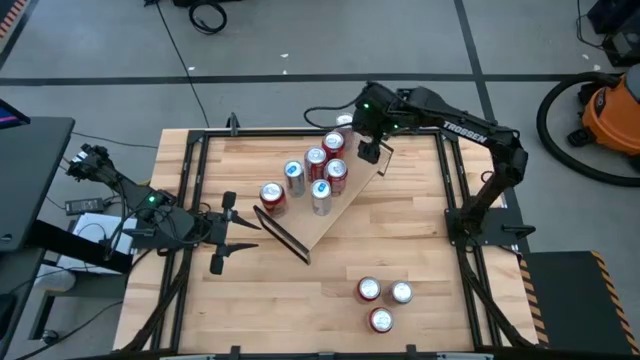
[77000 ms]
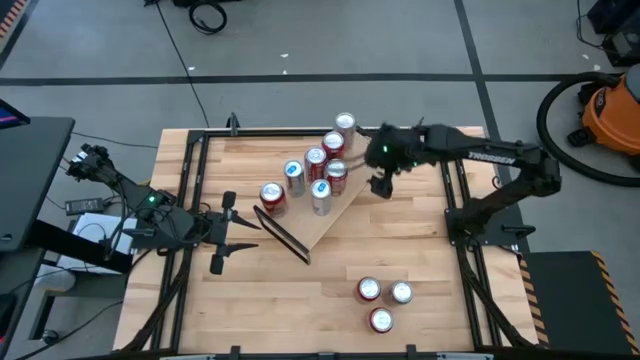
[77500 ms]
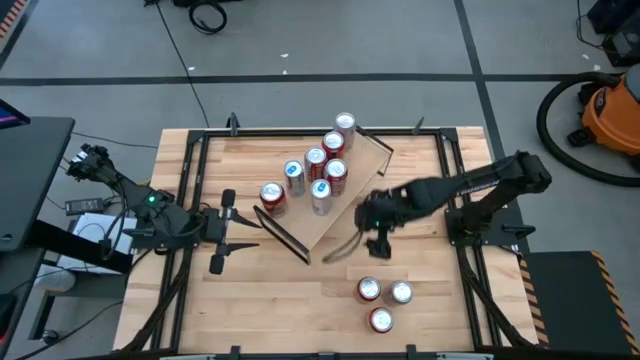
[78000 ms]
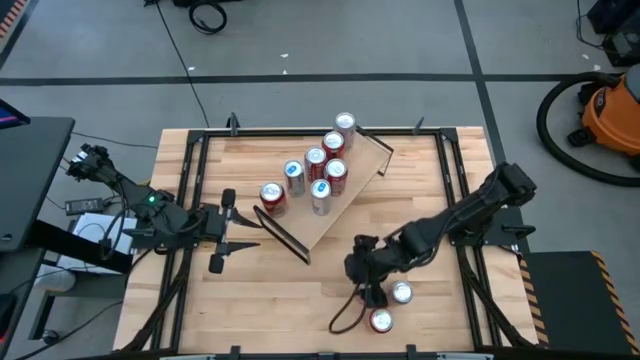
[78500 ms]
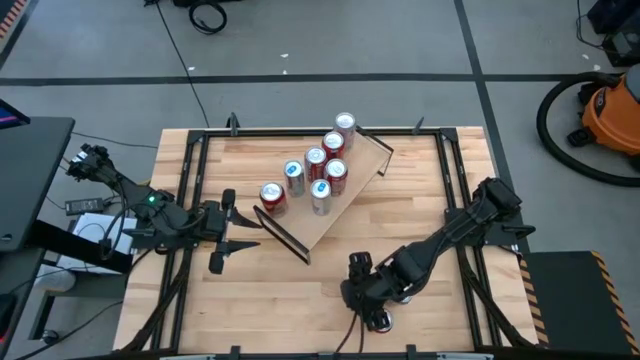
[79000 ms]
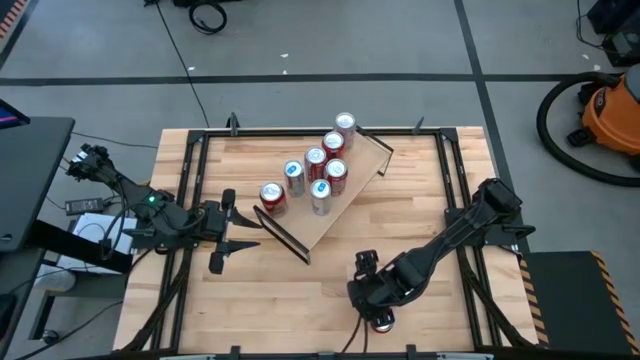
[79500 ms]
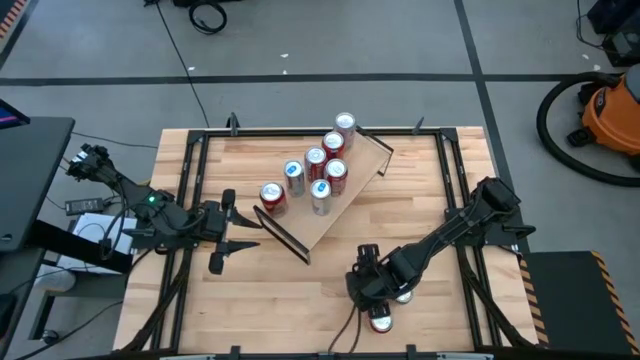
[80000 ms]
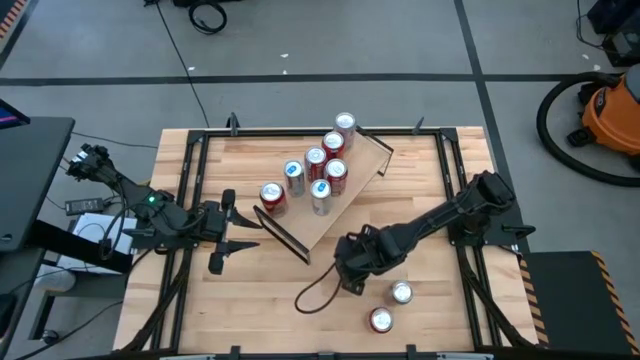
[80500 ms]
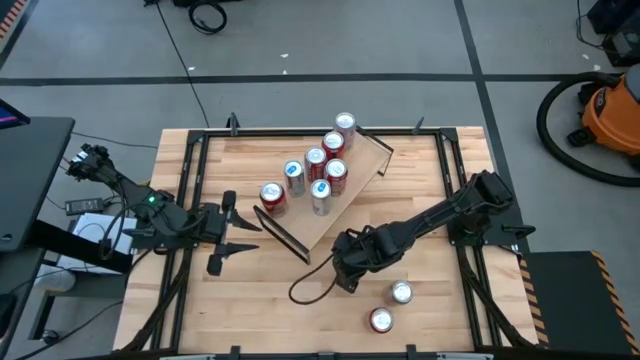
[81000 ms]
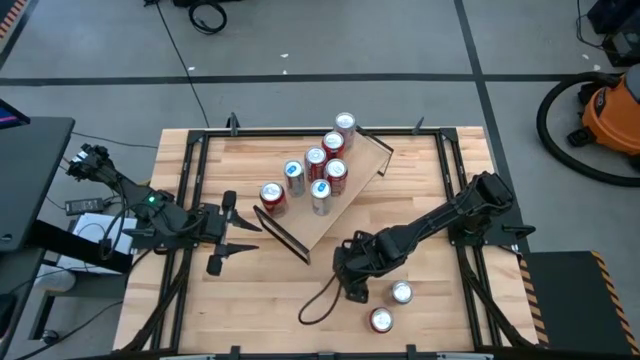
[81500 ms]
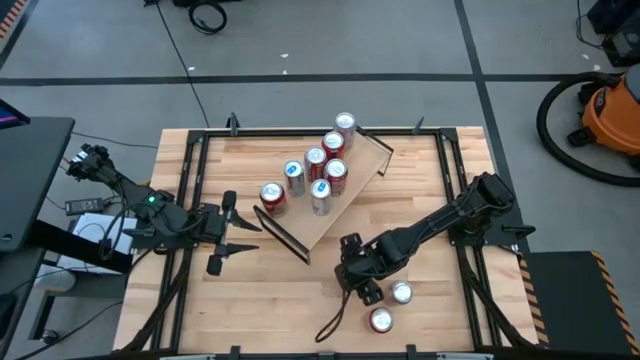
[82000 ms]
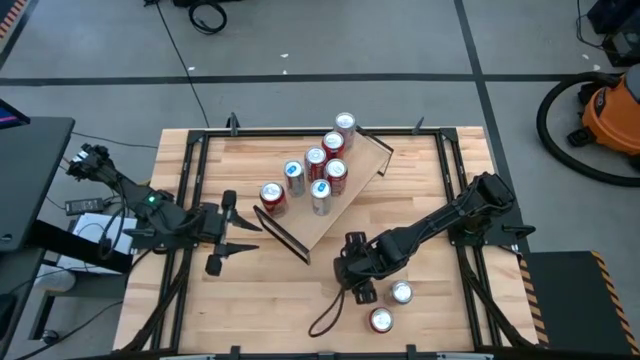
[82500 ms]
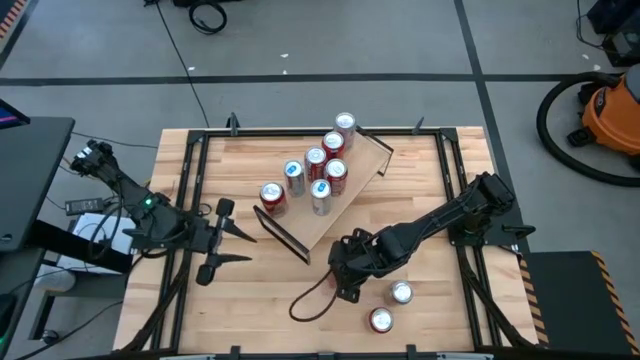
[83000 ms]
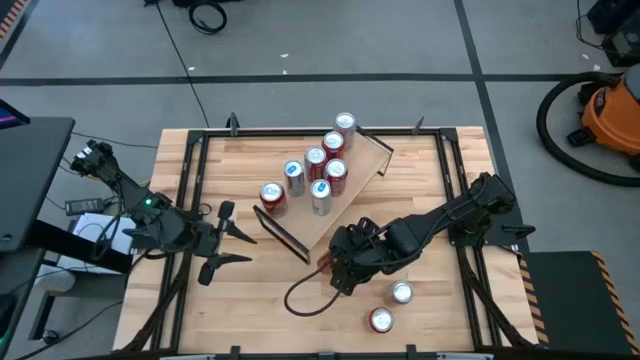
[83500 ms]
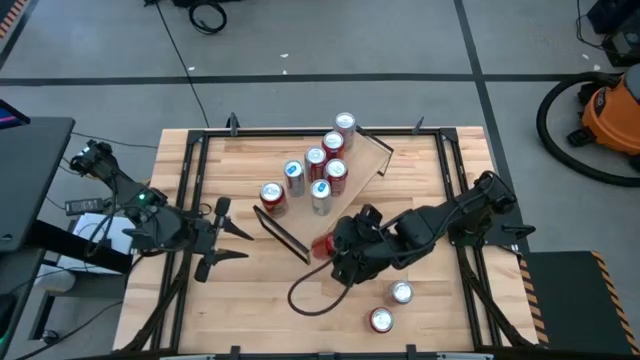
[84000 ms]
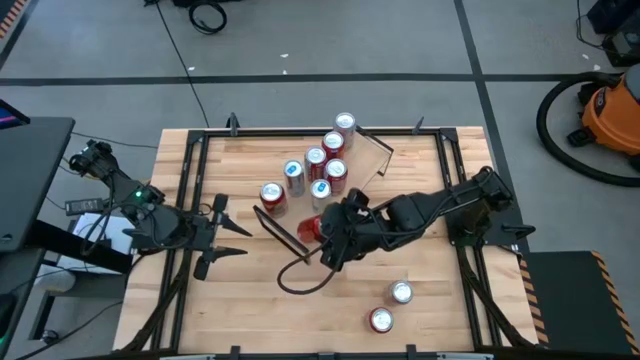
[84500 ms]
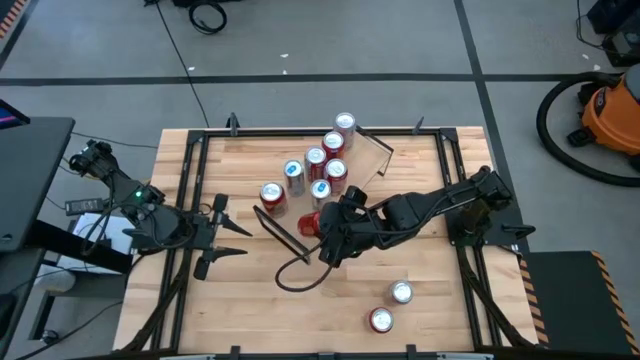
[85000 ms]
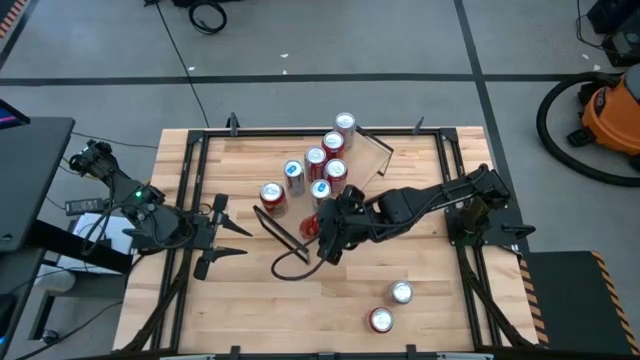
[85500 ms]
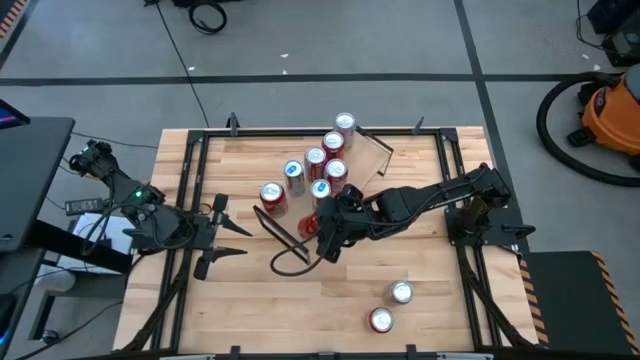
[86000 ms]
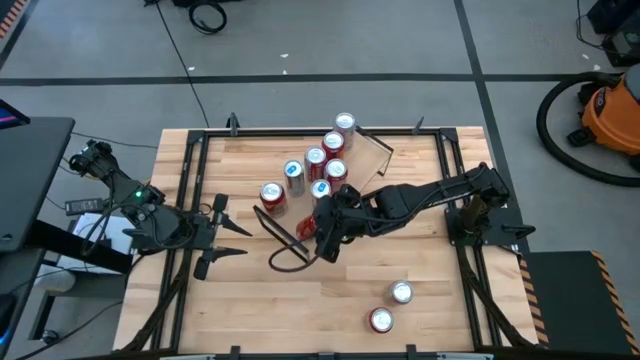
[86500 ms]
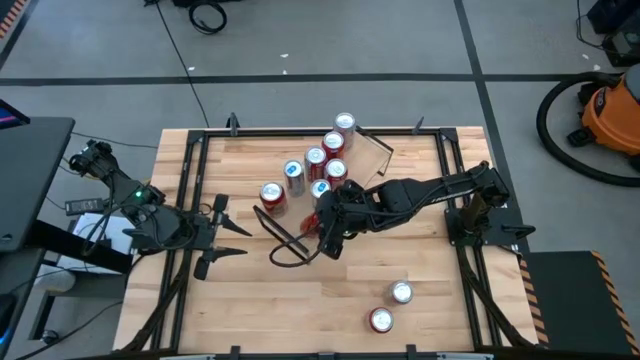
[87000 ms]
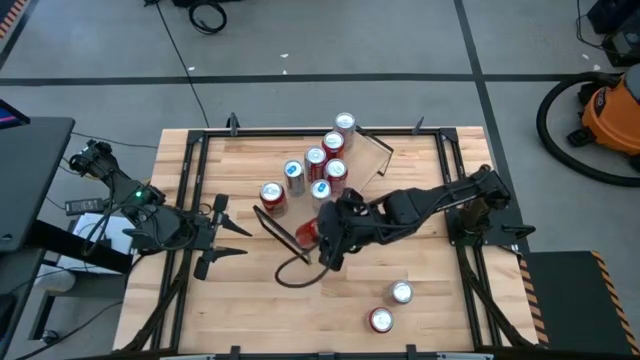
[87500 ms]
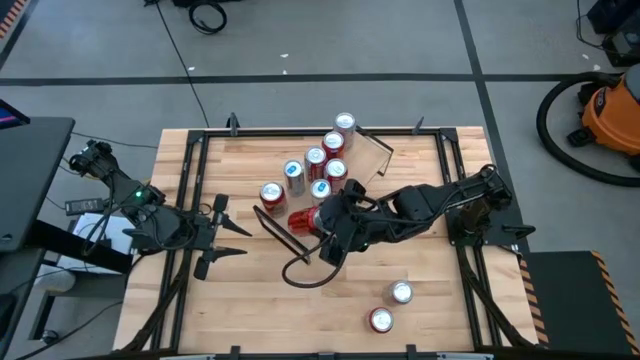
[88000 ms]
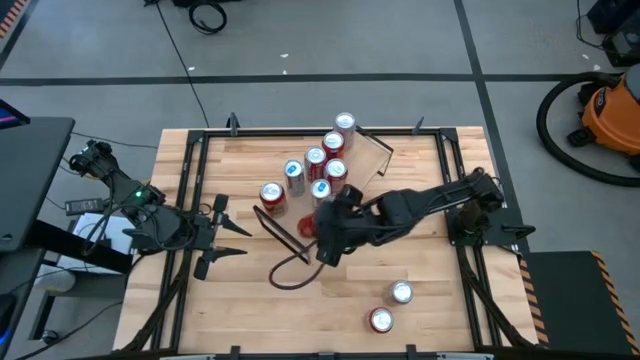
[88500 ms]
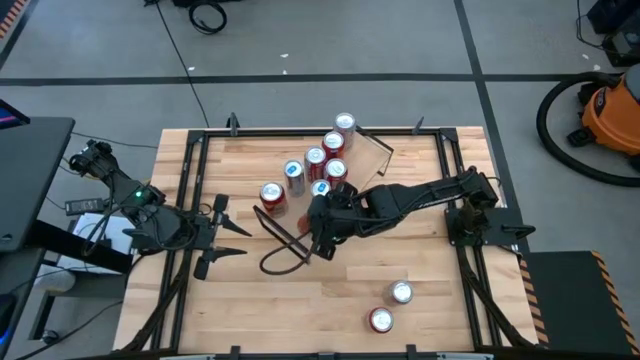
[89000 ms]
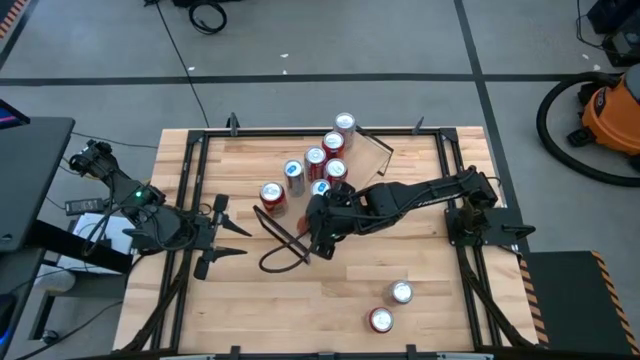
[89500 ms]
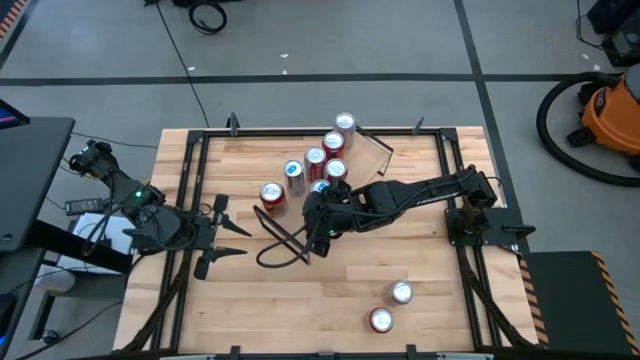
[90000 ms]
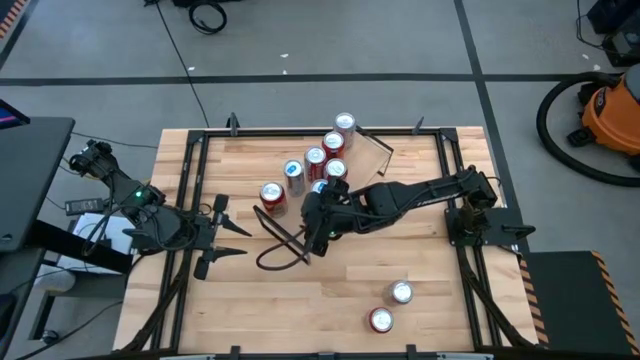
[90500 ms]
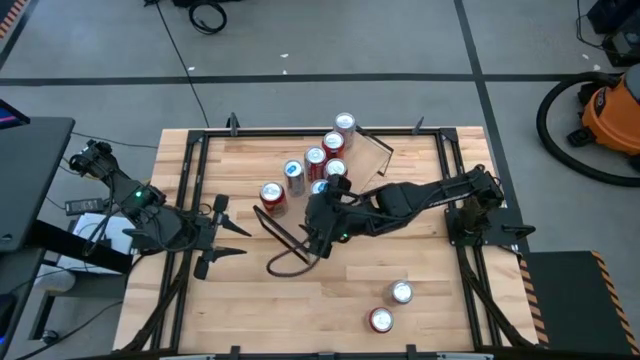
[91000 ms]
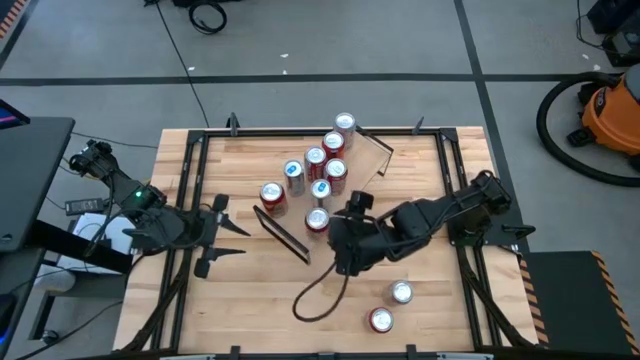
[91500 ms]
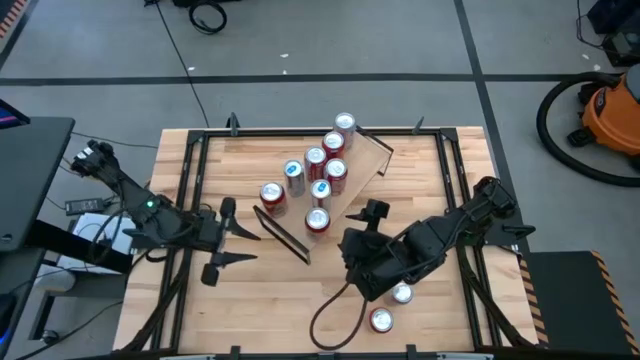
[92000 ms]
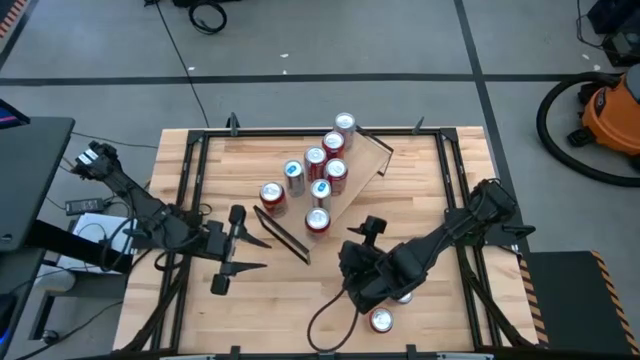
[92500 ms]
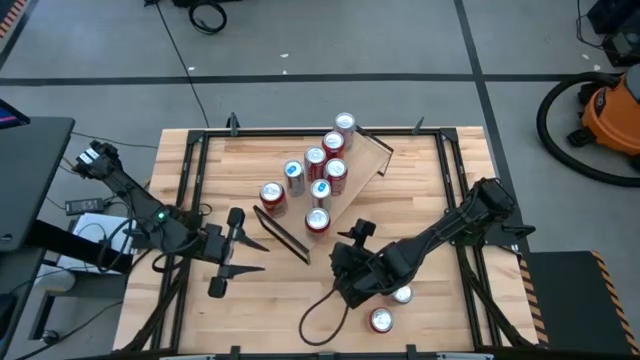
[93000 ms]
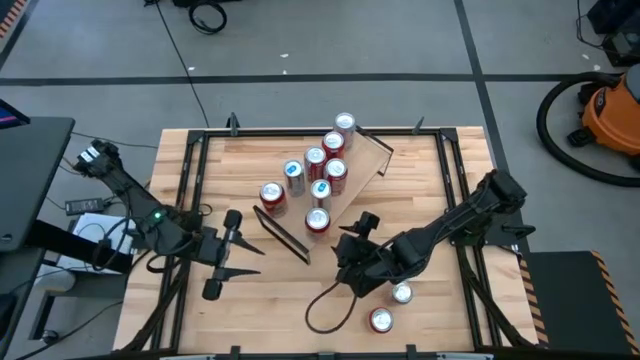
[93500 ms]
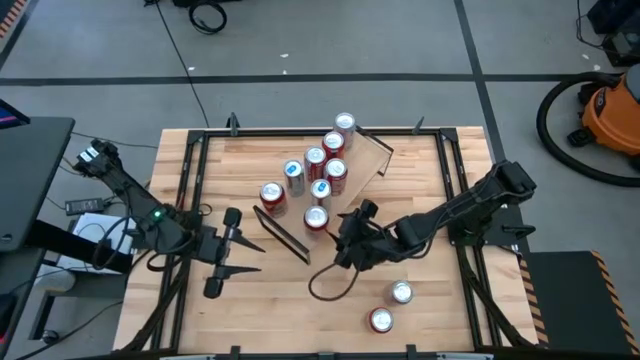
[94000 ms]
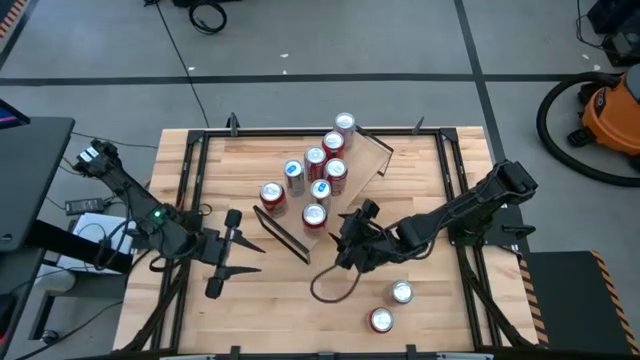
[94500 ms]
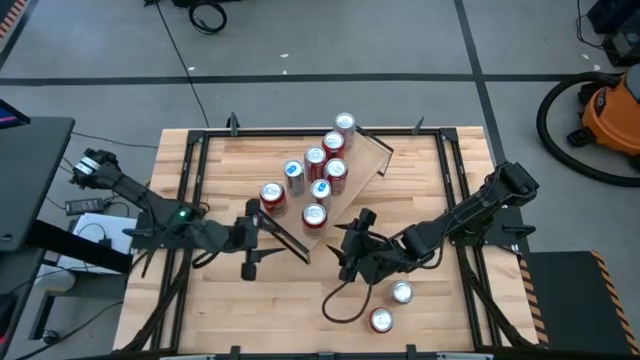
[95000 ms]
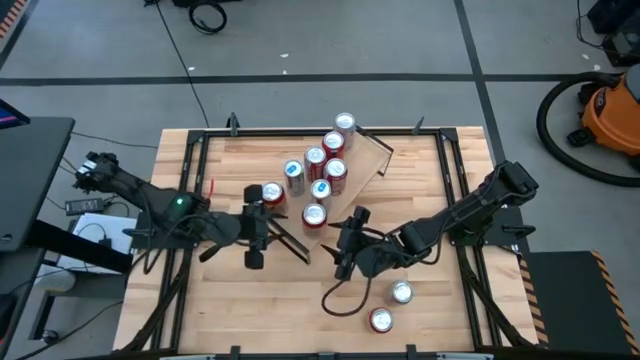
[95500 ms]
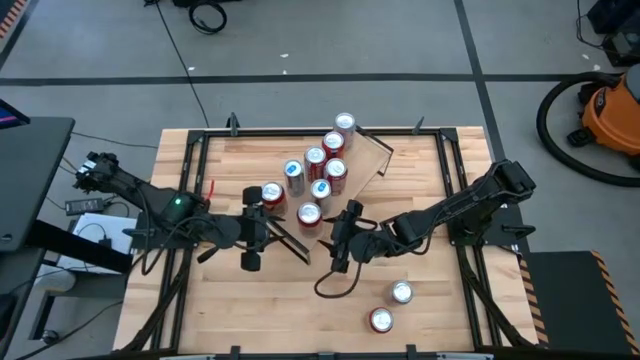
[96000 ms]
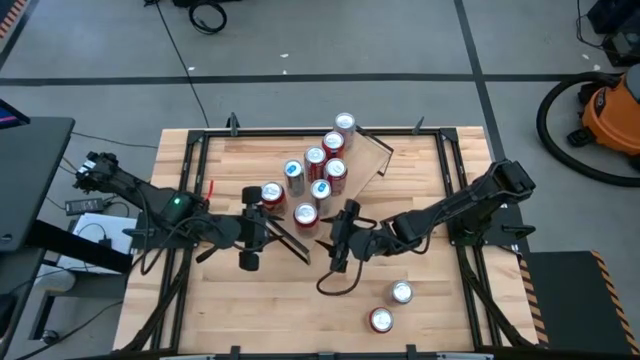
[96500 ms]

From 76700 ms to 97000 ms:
Task: Place canned beverage on shelf
Put the red and black soda can on the shelf aligned with the other red and black soda can
